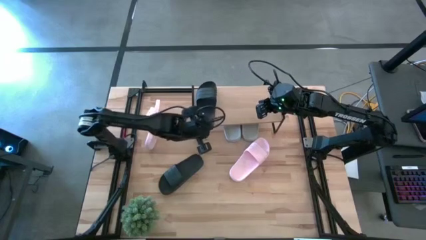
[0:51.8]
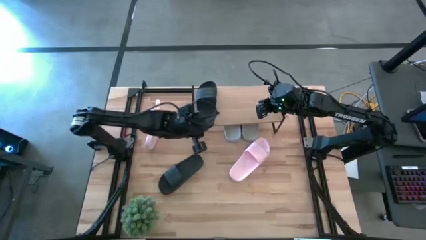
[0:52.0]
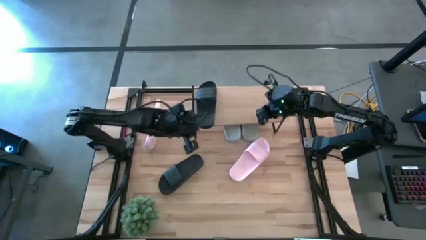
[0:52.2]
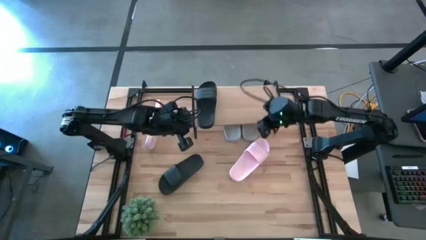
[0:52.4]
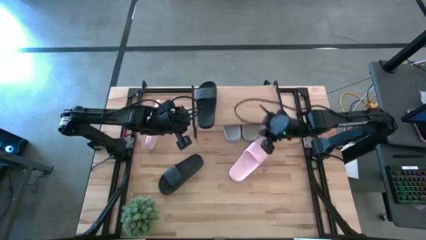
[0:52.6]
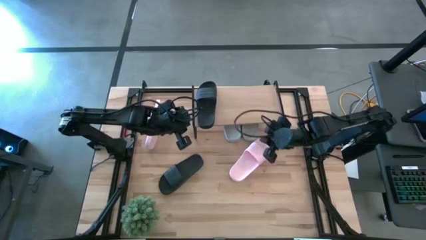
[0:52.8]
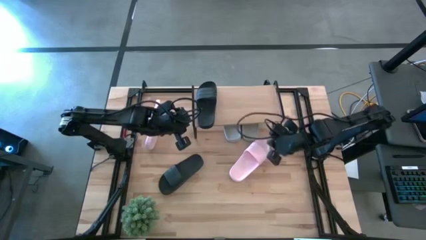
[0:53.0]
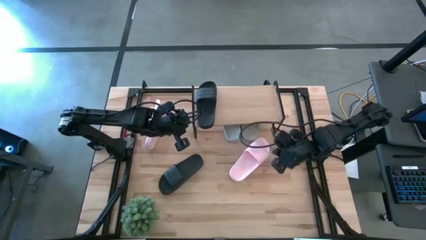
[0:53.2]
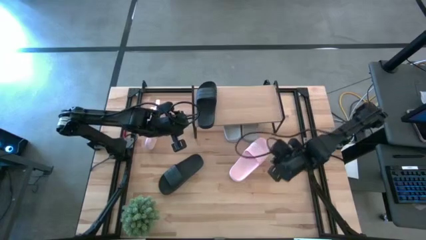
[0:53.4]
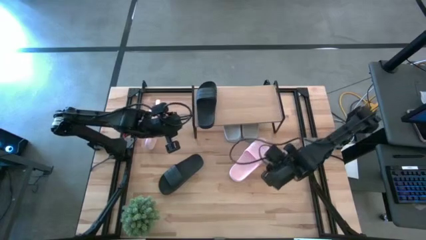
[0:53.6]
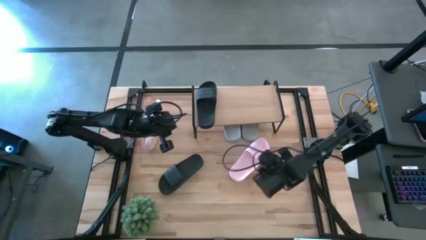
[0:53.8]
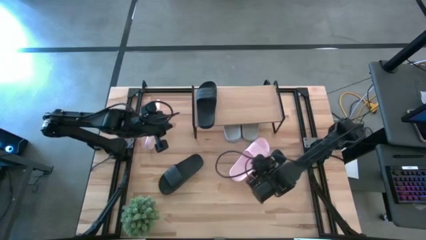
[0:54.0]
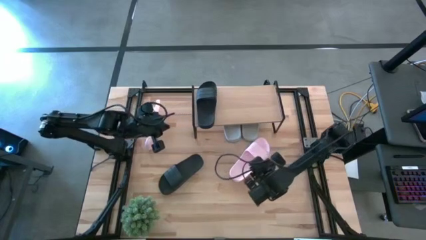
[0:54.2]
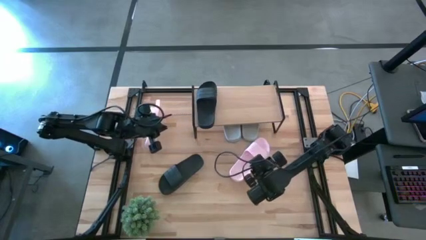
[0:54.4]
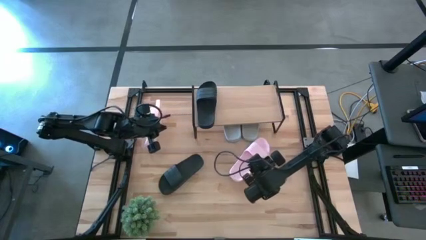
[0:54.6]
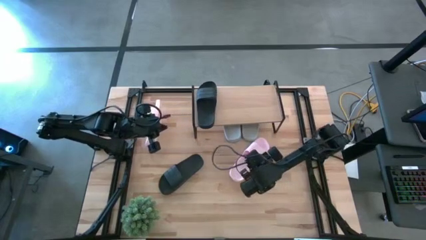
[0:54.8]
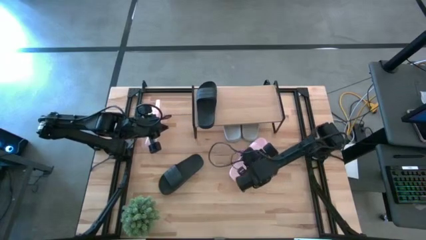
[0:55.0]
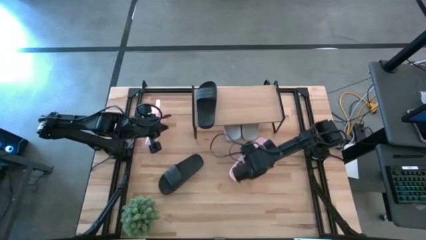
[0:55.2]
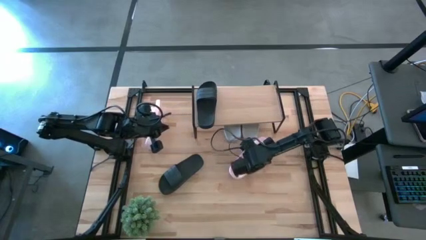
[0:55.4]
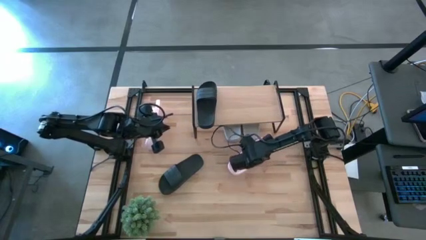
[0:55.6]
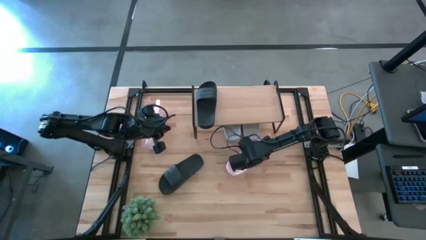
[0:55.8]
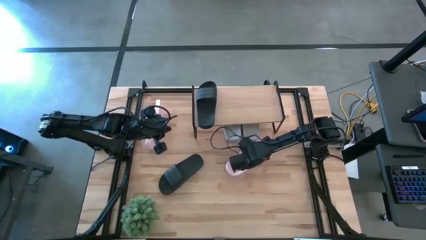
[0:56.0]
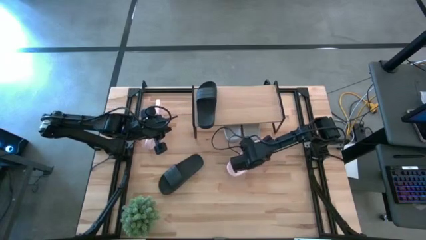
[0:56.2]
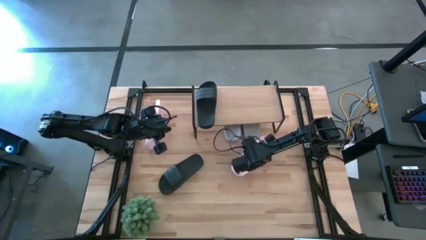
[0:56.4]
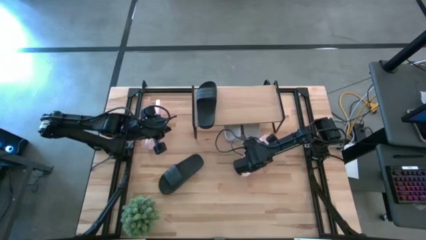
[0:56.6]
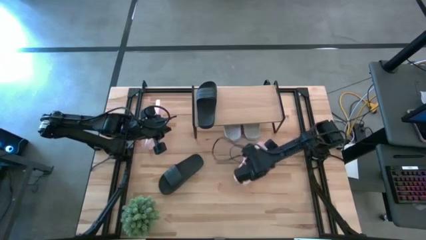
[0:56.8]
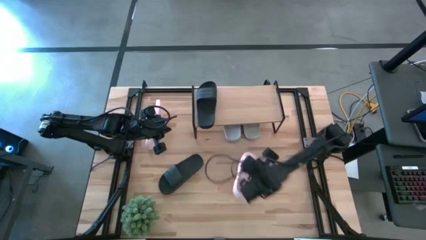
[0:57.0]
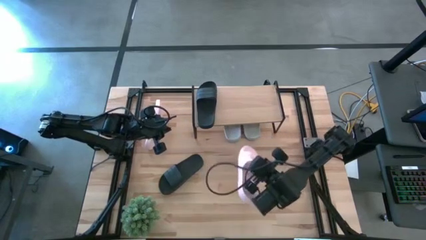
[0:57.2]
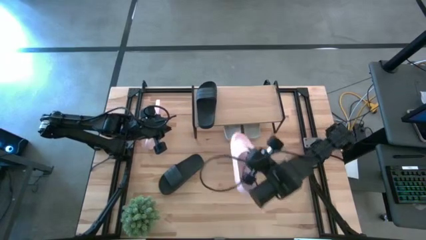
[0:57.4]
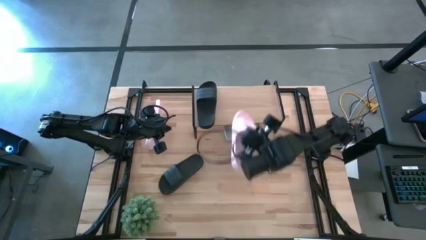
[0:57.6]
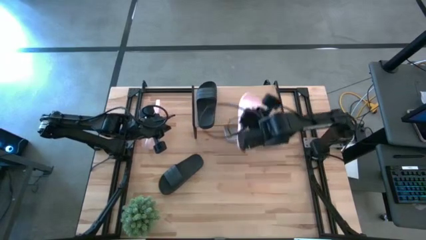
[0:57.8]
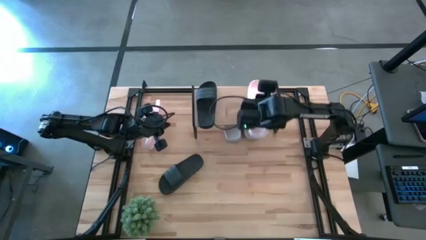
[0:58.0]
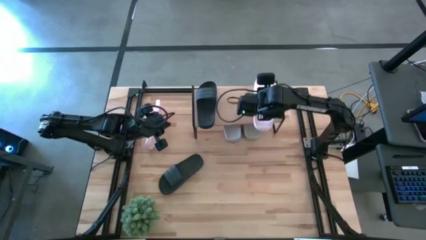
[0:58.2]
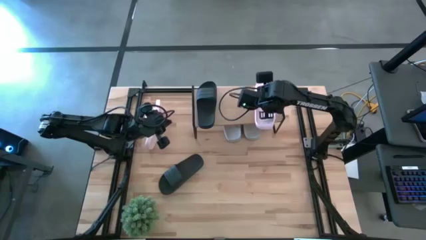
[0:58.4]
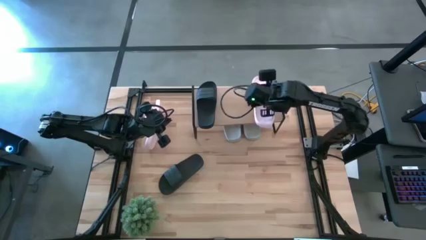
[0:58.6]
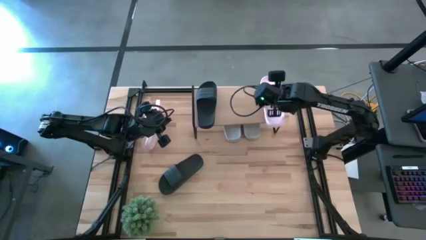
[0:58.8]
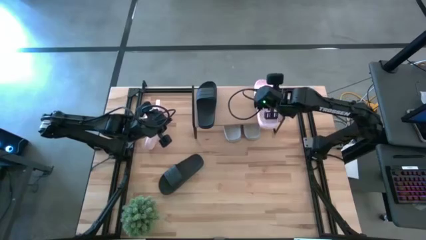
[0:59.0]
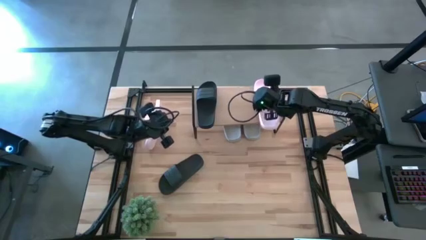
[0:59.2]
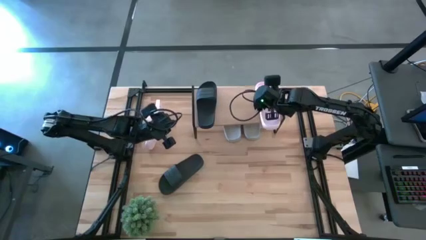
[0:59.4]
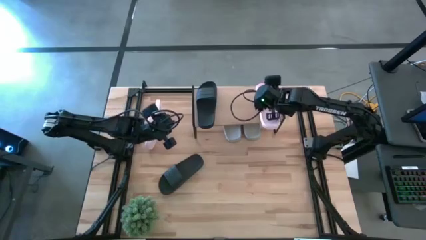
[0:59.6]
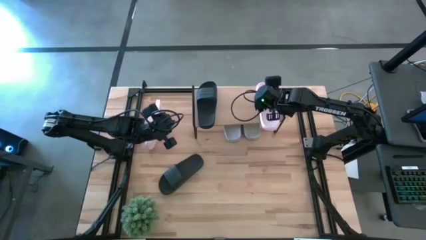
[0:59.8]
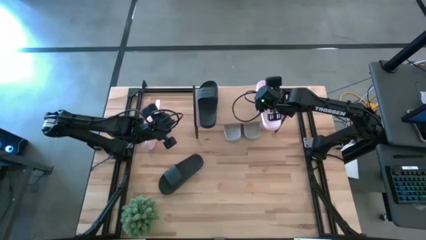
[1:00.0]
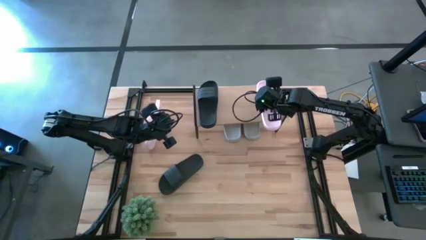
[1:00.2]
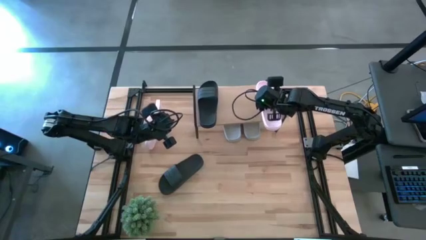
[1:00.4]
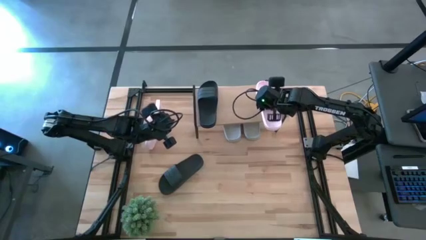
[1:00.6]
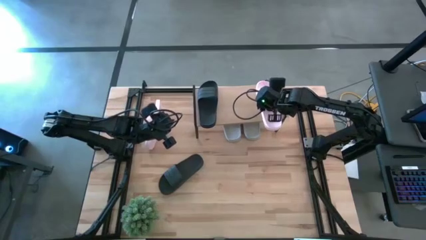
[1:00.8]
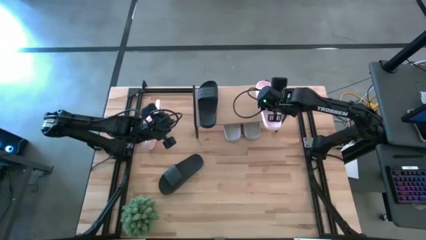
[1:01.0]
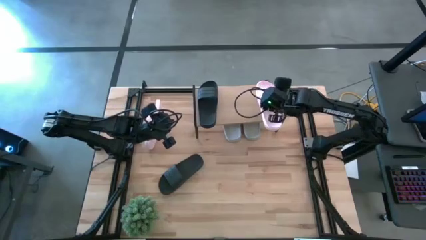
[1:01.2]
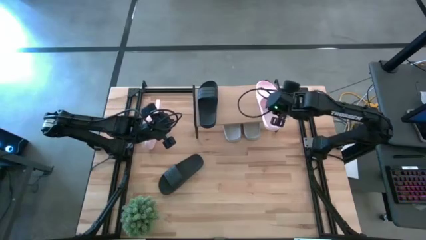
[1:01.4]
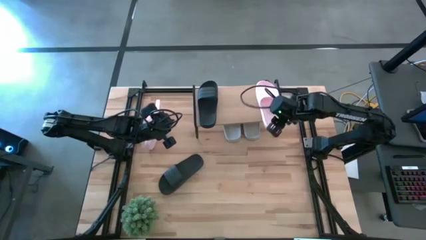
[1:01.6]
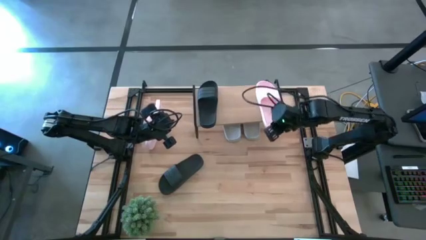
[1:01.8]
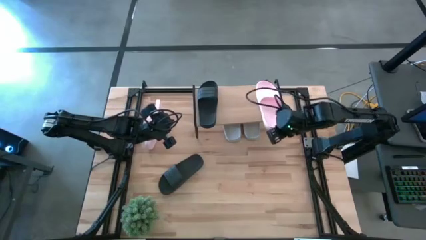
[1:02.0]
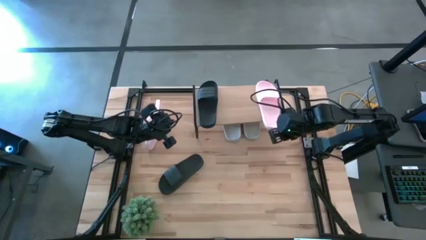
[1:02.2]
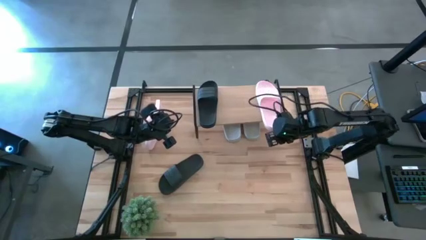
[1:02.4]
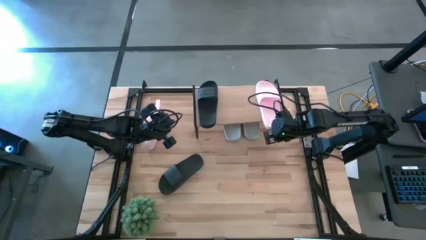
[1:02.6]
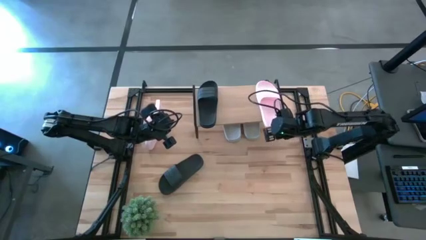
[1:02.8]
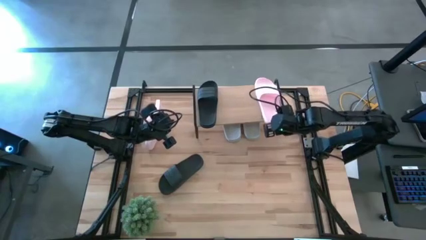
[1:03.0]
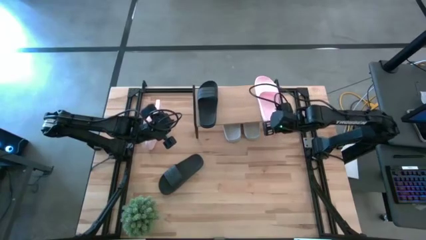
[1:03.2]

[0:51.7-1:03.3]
Task: Pick and place slides into the shelf
Put the right pink slide on the shelf

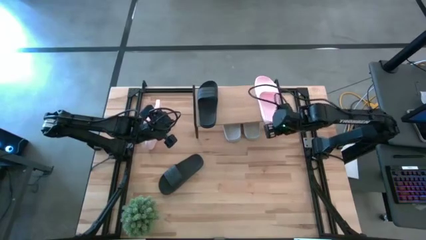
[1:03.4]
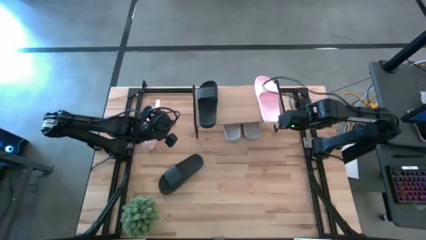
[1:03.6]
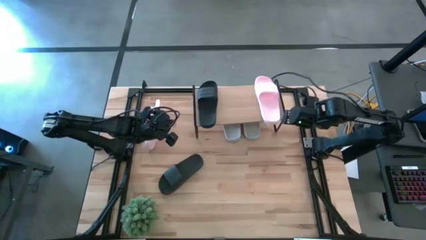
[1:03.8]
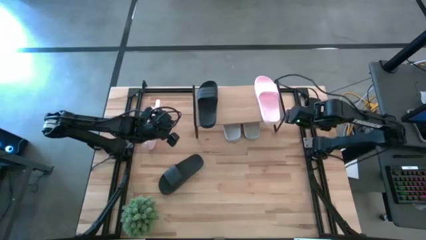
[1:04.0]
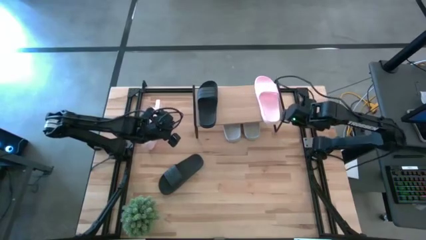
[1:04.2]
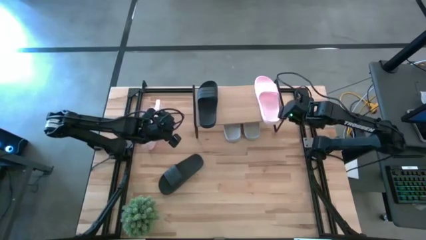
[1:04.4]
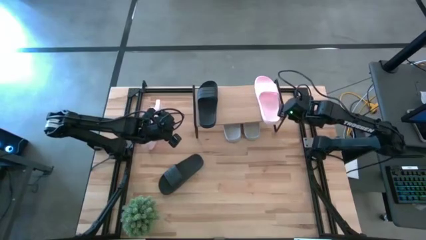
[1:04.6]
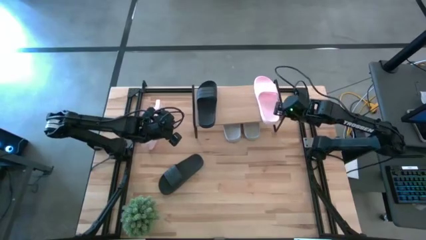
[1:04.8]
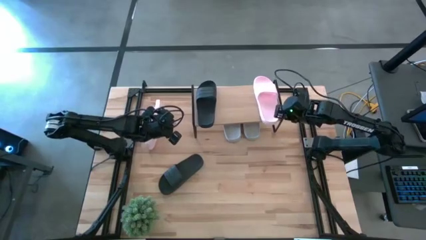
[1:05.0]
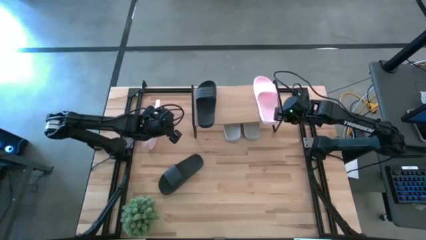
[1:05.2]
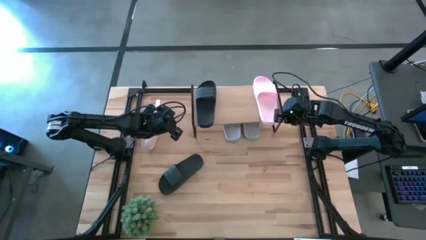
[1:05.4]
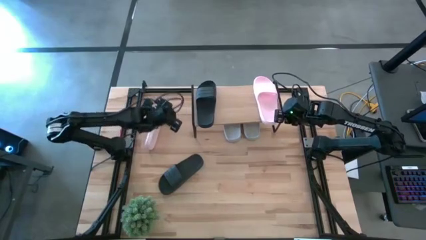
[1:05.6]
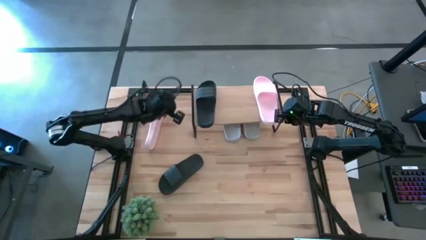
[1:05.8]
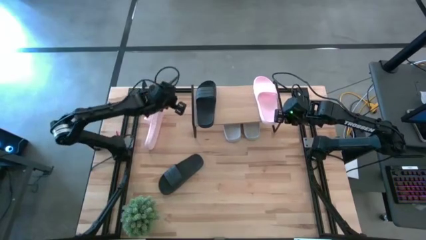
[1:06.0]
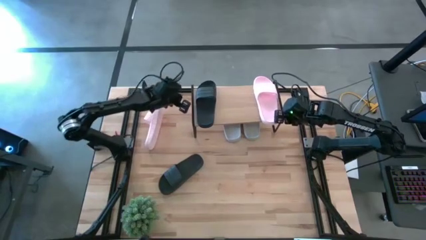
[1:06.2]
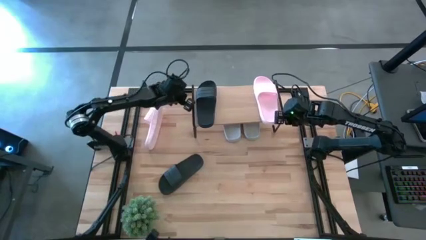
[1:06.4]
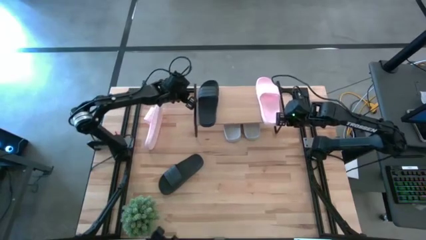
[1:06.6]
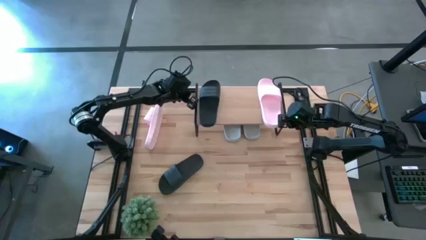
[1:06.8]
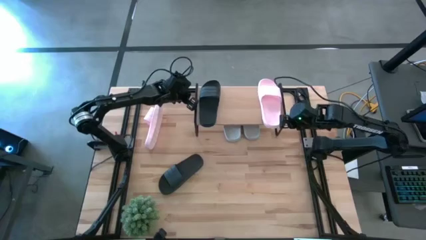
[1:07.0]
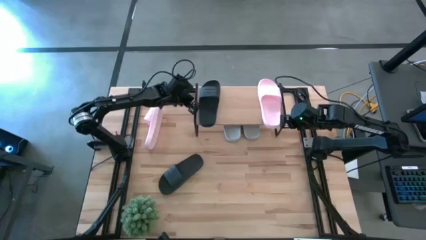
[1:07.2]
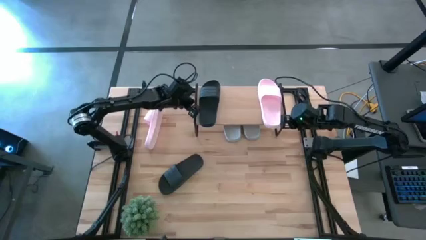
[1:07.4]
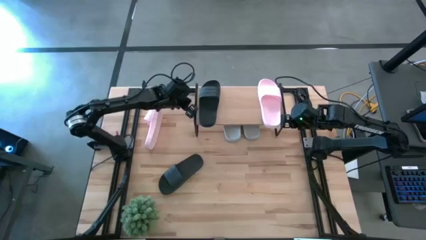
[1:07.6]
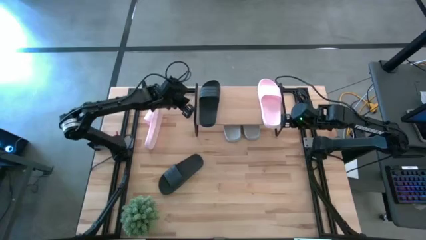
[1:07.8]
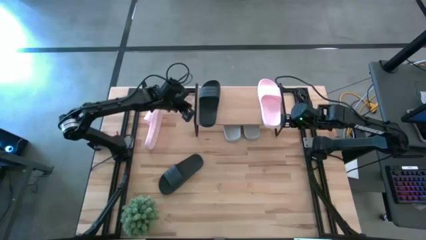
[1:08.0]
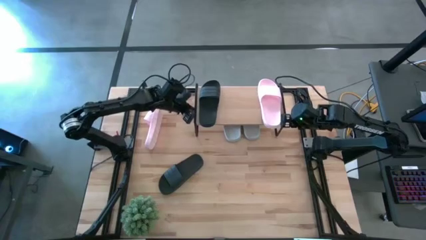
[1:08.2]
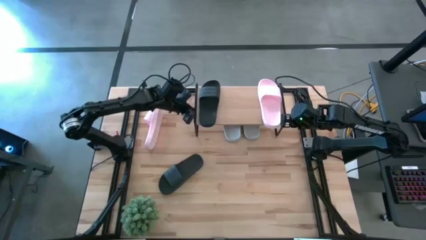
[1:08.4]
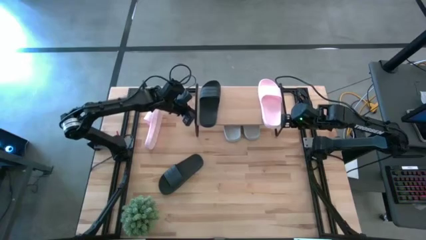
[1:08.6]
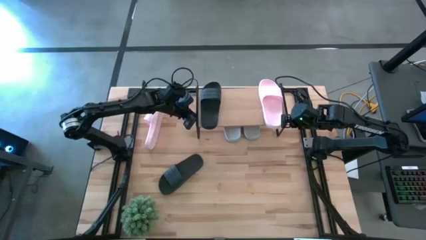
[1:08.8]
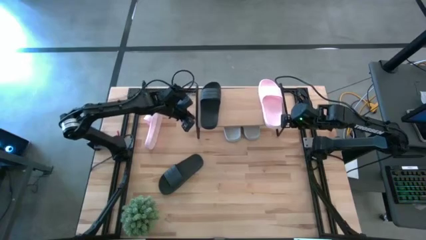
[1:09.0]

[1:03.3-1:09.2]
Adjust the shelf
